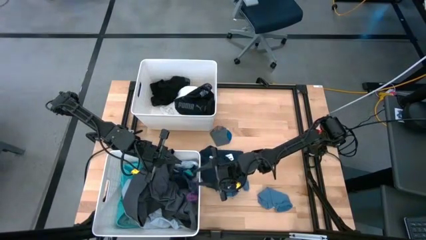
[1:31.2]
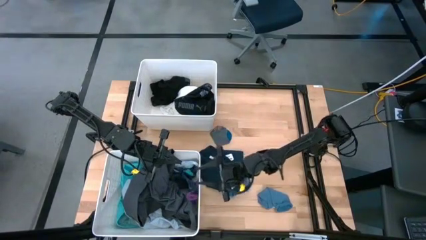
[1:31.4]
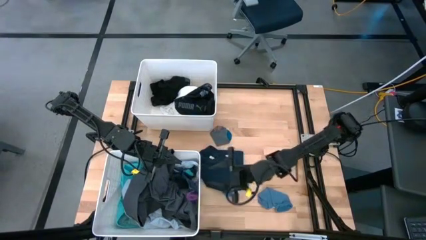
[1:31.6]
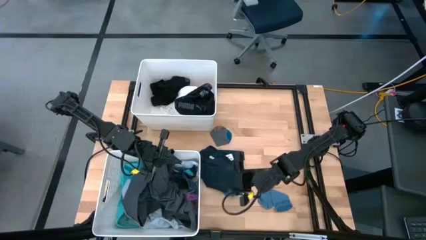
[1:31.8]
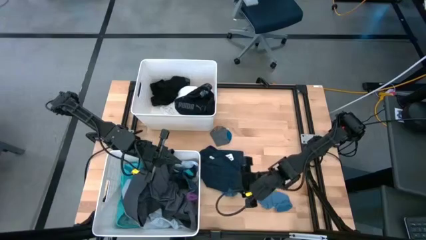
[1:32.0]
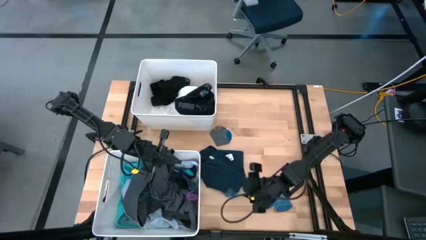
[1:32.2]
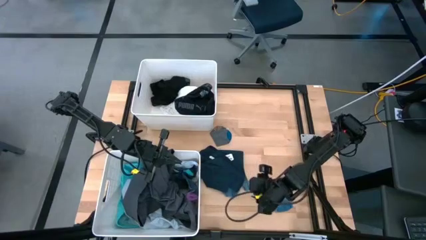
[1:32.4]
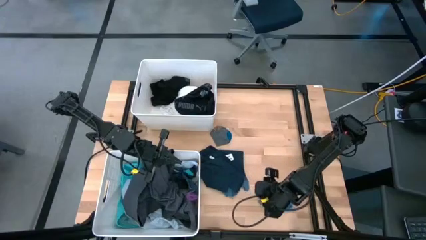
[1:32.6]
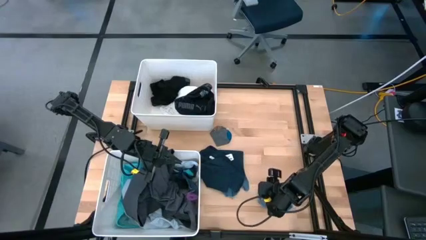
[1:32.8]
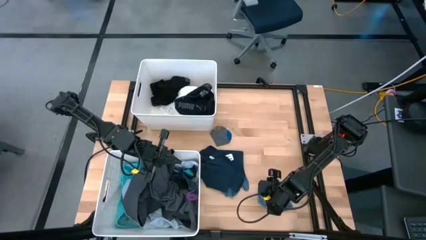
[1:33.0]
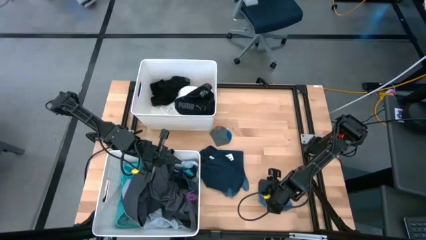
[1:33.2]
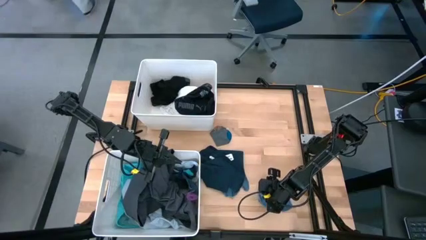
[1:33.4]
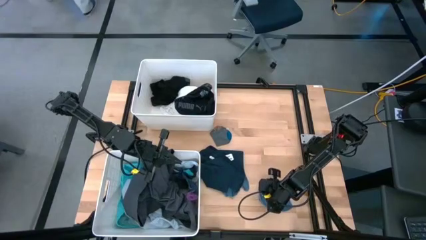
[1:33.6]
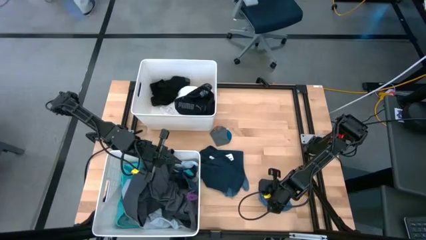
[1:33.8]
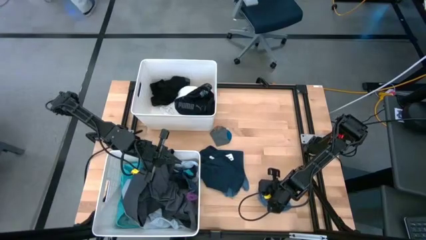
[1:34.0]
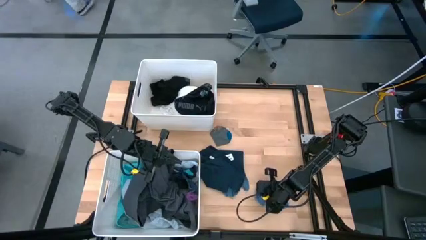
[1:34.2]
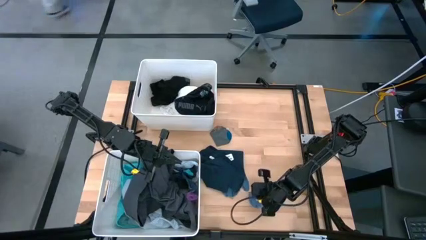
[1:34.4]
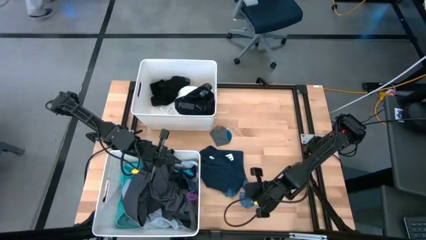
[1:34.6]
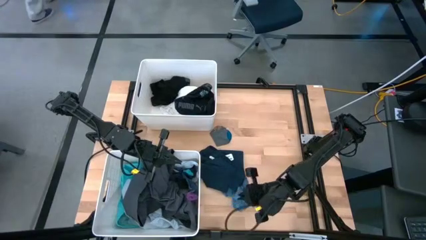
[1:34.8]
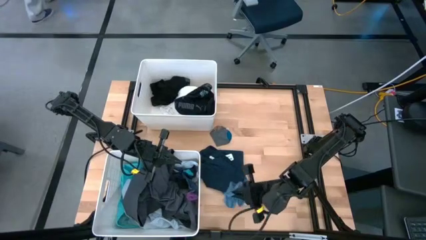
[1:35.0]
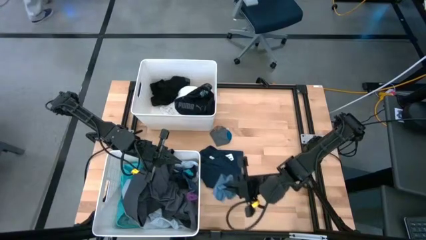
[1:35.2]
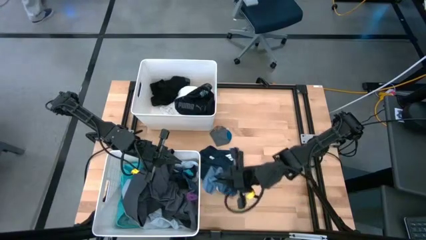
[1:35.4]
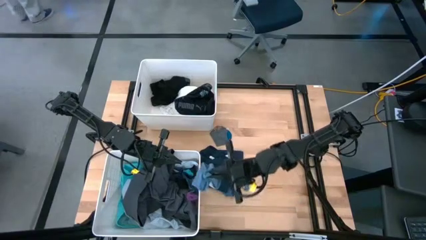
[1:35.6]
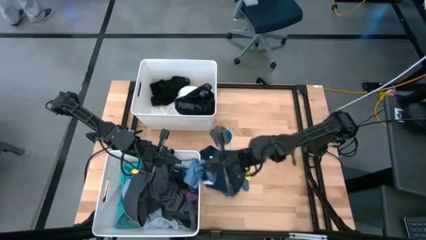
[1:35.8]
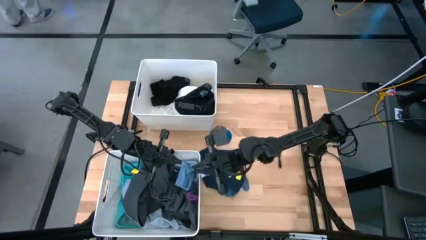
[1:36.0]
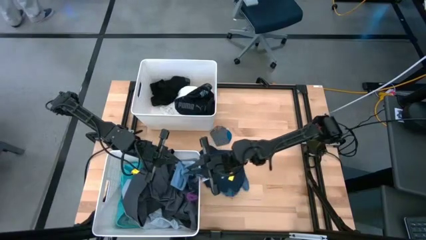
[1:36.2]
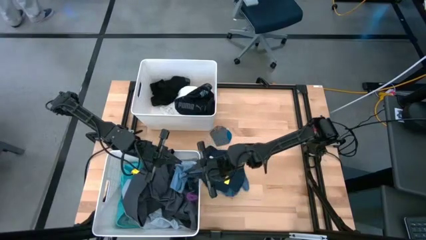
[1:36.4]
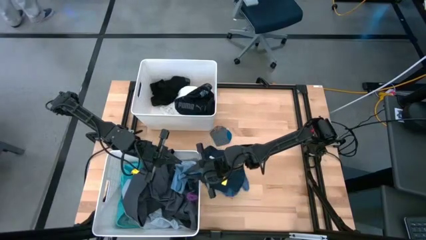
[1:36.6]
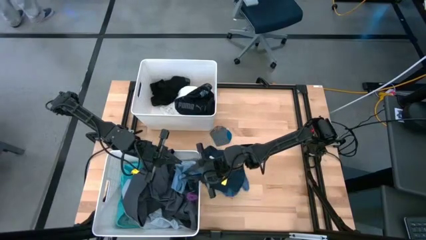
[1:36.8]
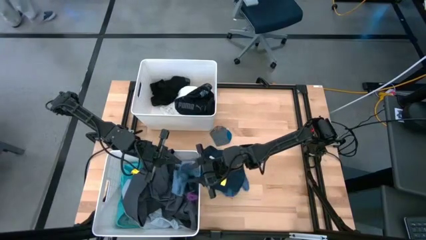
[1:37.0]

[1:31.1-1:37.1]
Task: Sort clothes
Put the right light blue sock into the bottom laundry organizer

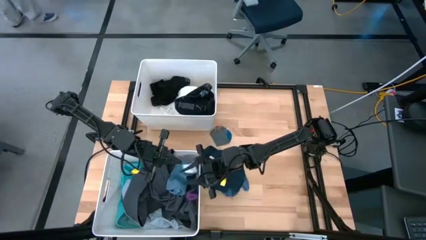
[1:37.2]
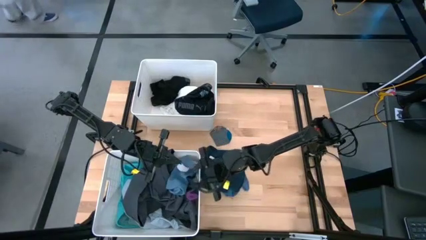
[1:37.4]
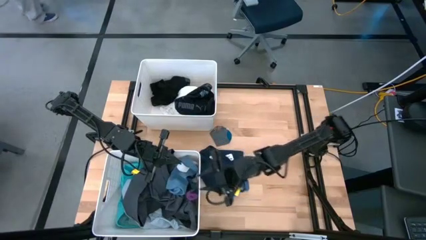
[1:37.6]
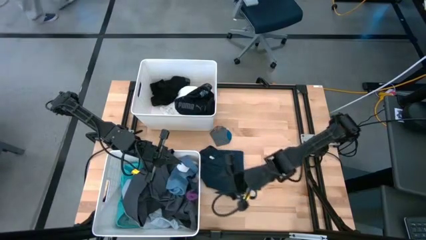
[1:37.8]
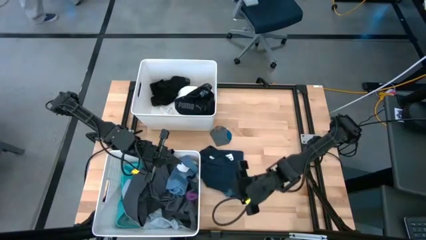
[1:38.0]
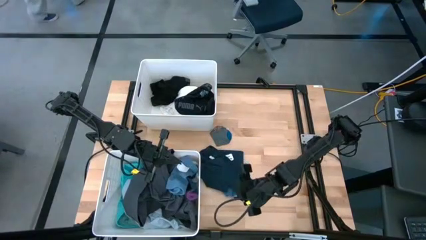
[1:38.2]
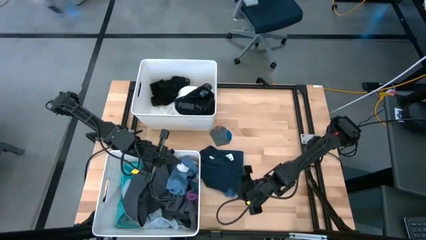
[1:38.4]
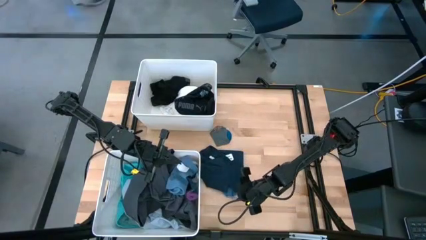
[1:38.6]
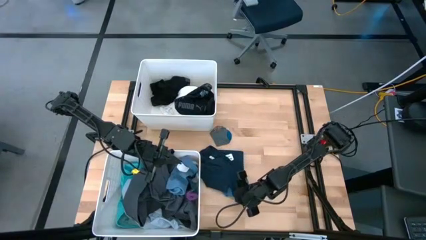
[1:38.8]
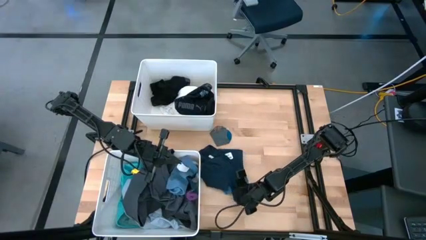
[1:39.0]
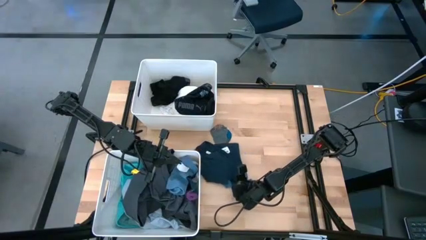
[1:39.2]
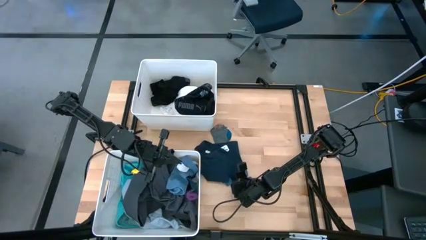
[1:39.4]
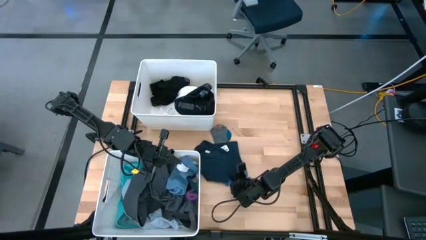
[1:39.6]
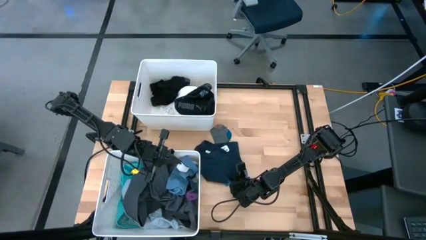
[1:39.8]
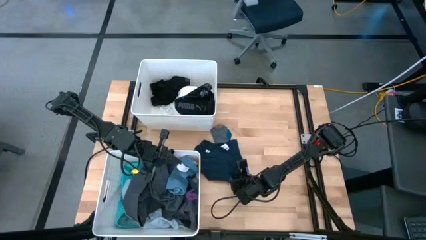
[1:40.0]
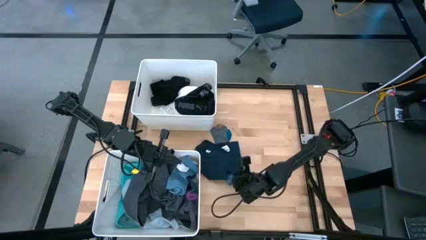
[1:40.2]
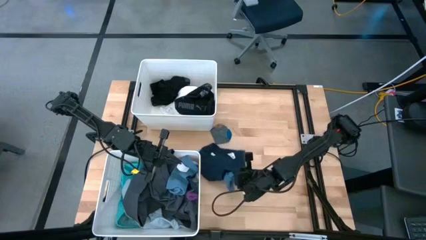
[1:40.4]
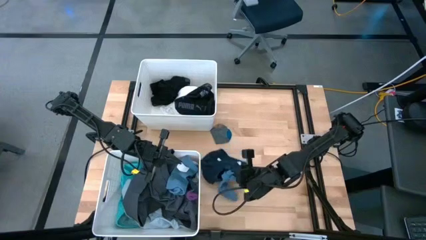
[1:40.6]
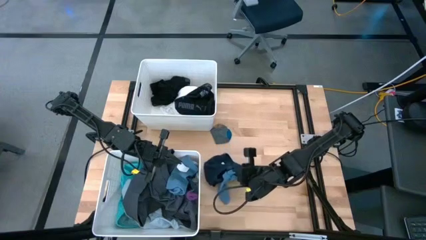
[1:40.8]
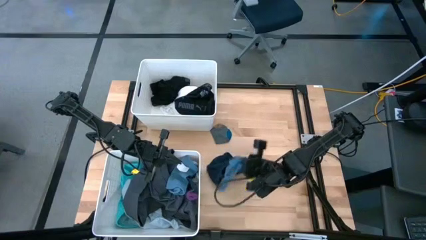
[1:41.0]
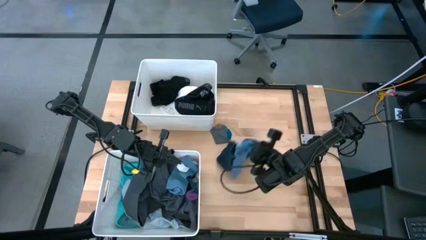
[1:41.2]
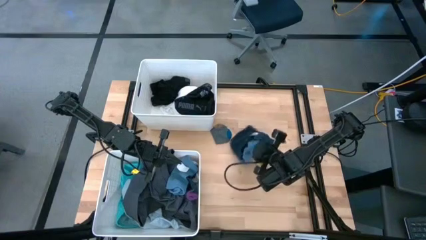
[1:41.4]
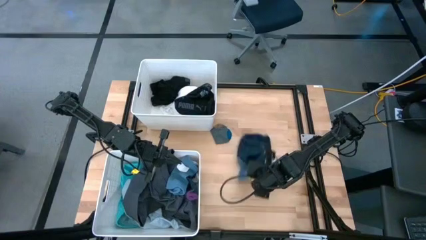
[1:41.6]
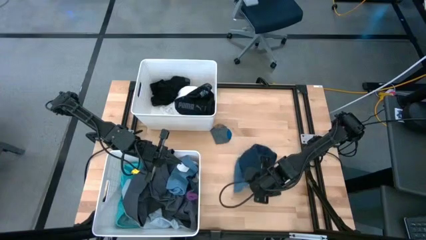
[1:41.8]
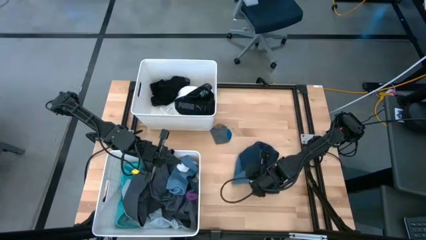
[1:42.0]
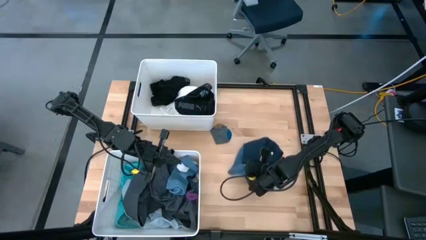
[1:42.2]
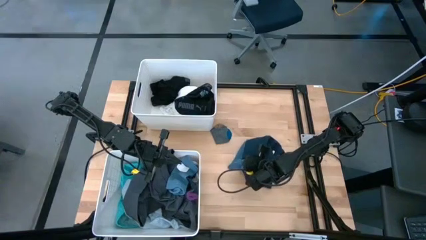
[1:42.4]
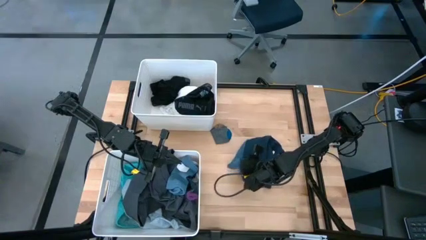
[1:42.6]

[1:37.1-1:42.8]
Put the light blue sock into the bottom laundry organizer

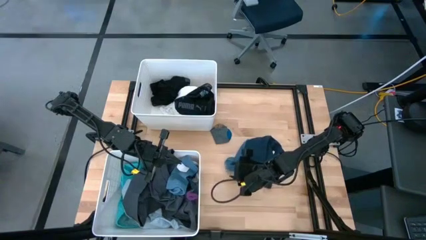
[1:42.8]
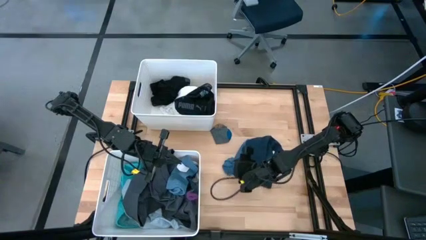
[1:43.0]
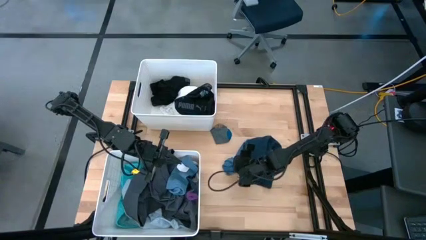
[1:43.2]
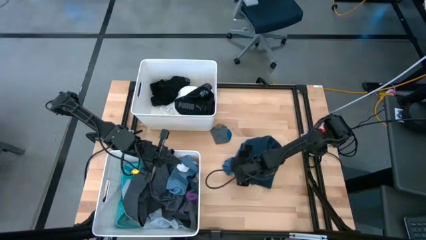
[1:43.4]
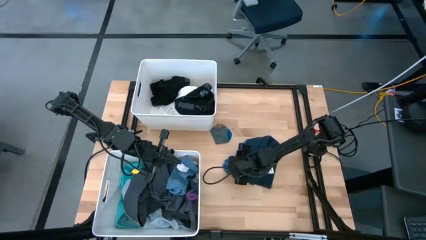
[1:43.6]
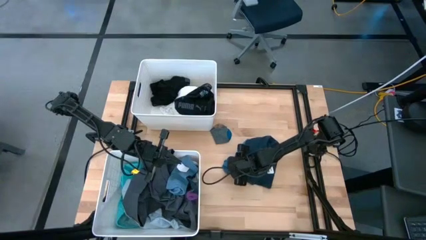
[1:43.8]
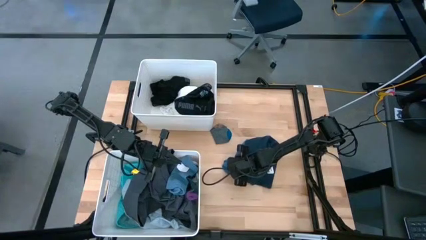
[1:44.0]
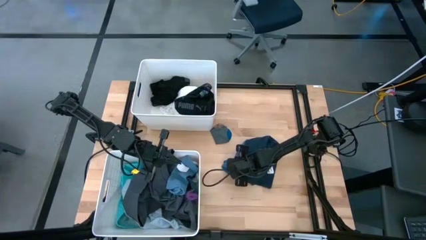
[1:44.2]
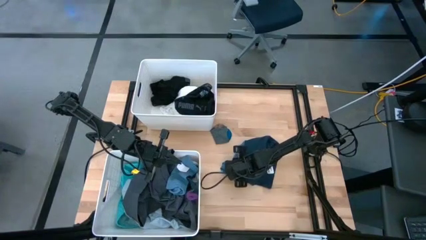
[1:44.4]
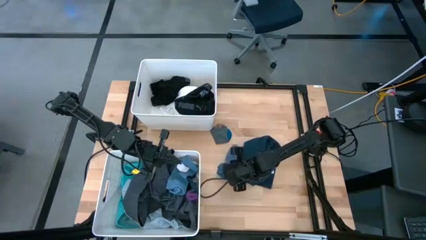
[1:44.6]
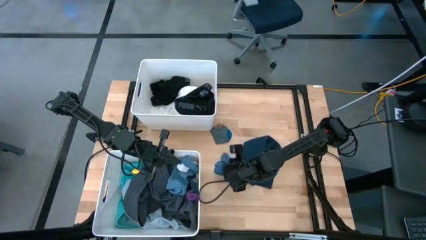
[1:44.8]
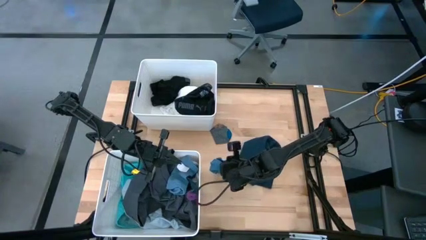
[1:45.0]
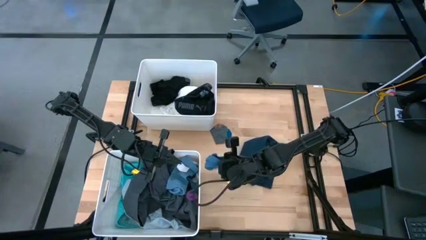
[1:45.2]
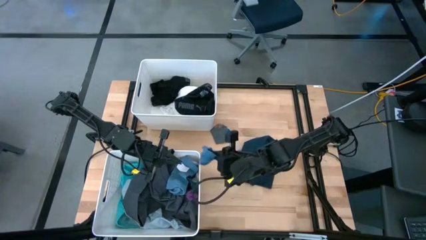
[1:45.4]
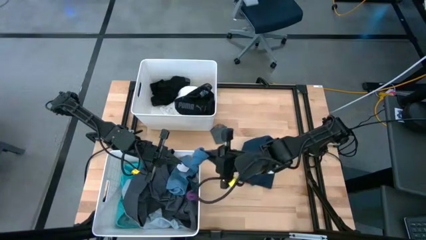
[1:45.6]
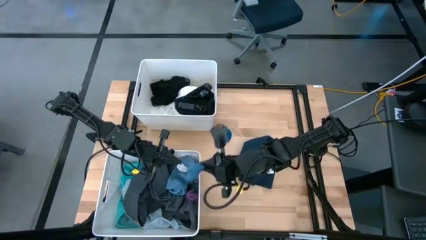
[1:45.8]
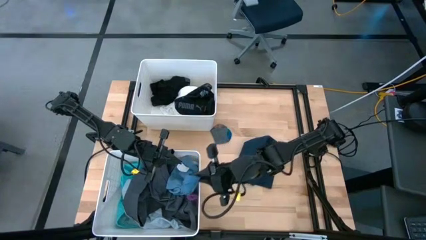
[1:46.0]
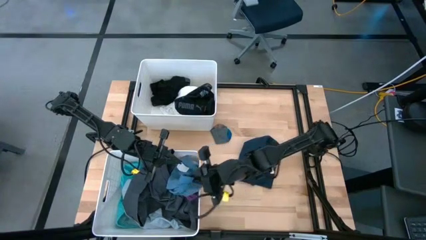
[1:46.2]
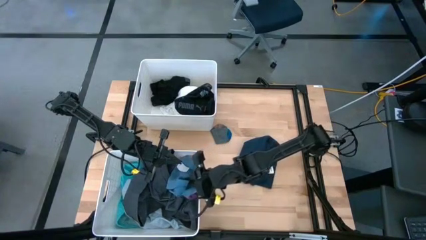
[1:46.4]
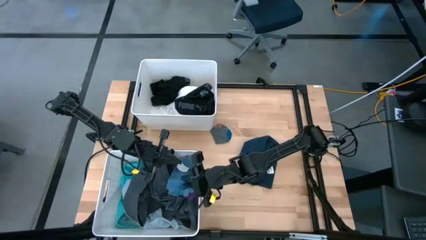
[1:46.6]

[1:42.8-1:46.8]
Put the light blue sock into the bottom laundry organizer

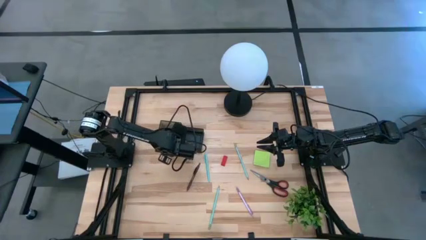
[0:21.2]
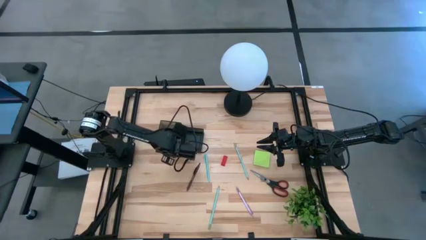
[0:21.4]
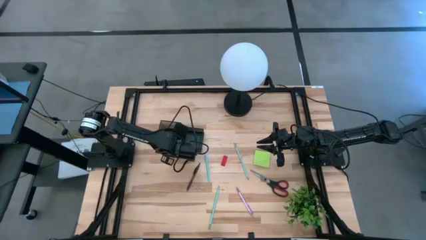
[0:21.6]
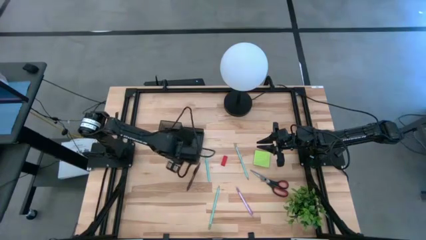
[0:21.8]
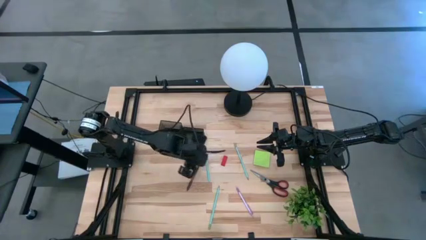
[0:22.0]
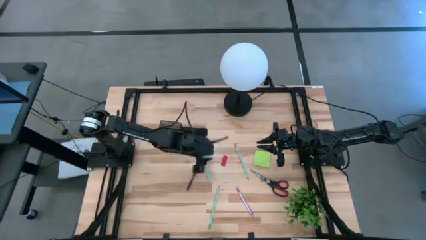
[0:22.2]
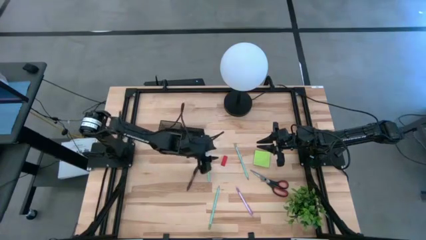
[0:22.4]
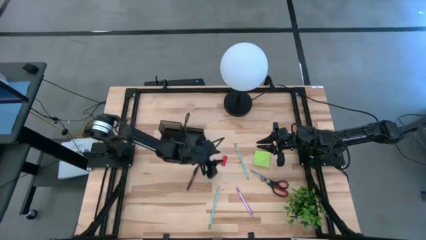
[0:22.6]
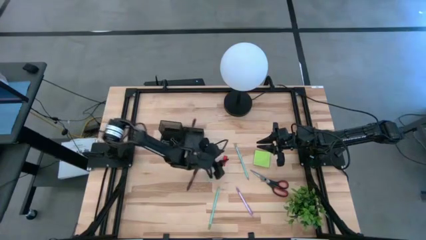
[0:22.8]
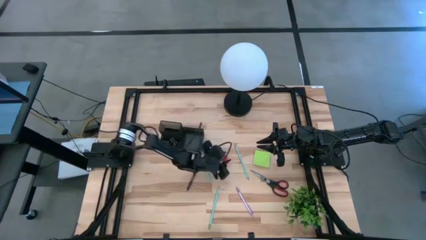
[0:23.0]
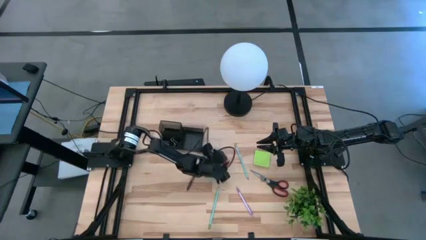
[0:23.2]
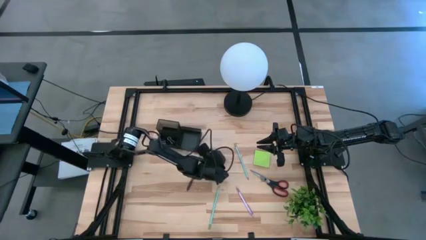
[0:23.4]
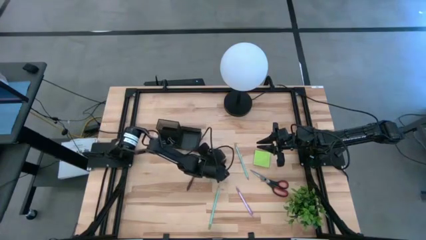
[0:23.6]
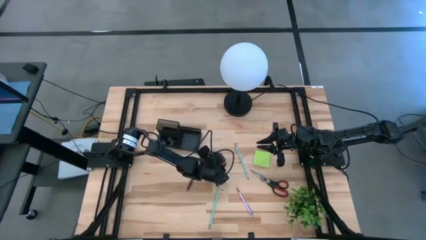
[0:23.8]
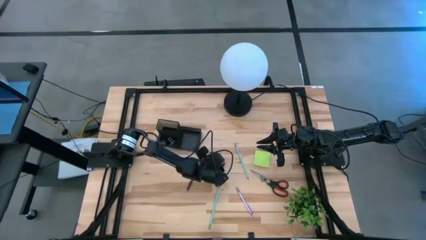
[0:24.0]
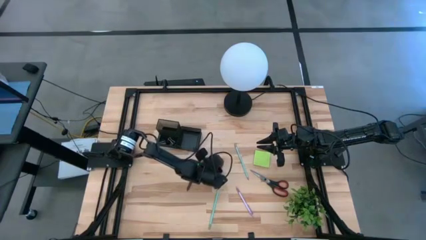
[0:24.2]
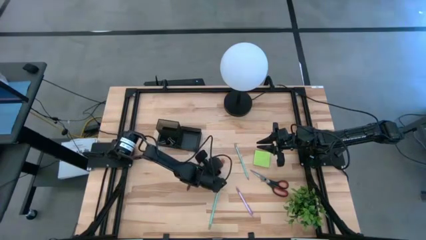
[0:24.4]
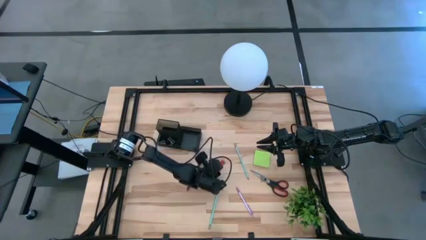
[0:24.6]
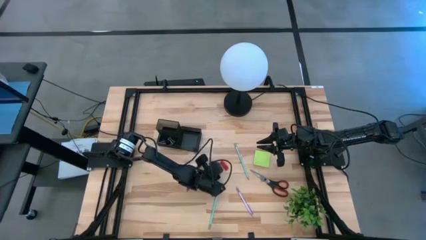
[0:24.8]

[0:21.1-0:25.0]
Task: Pick and place office supplies into organizer
Put the red eraser into the black desk organizer
